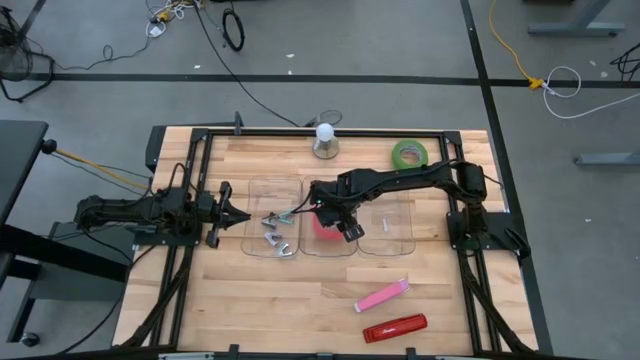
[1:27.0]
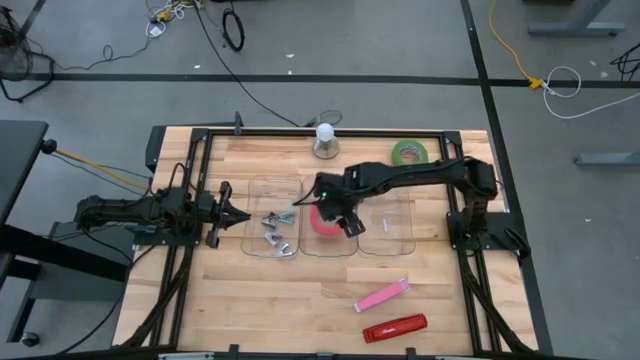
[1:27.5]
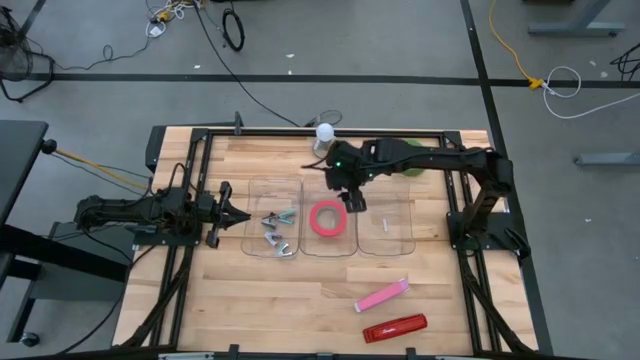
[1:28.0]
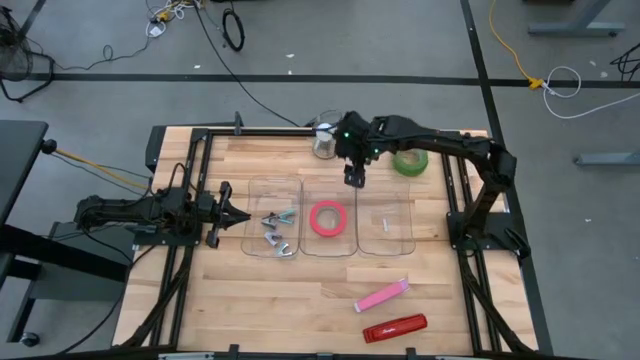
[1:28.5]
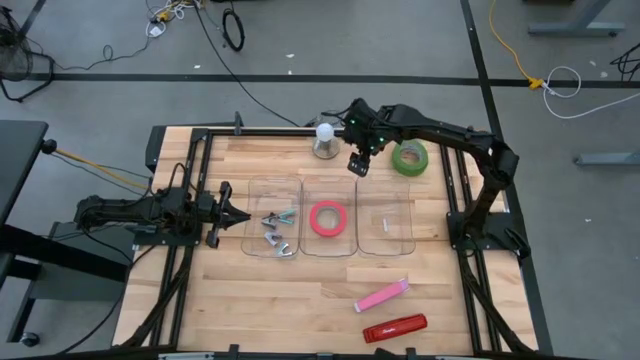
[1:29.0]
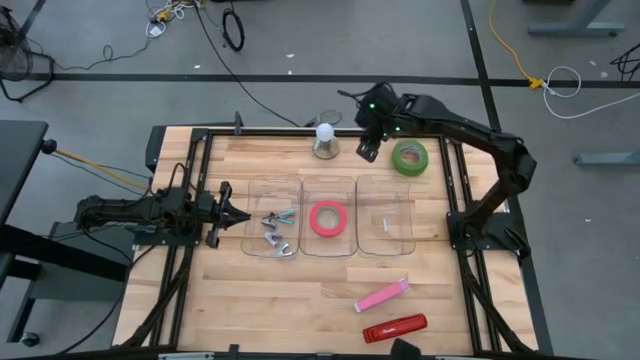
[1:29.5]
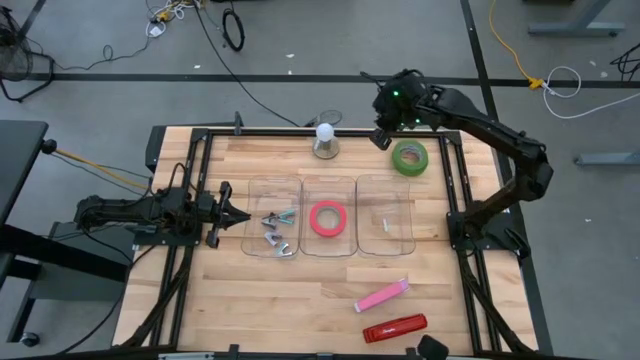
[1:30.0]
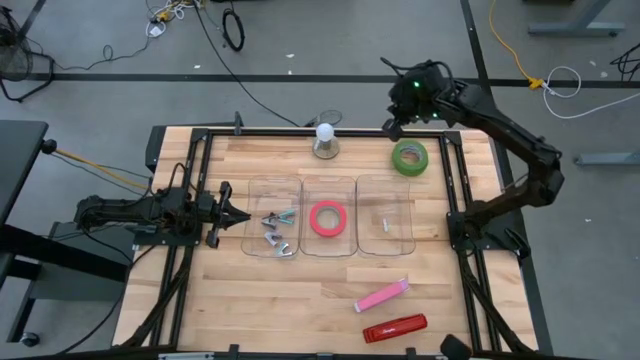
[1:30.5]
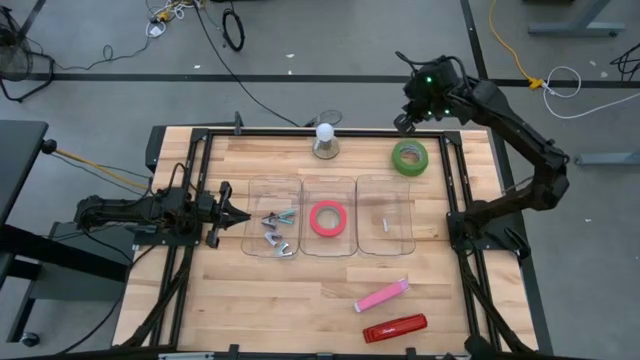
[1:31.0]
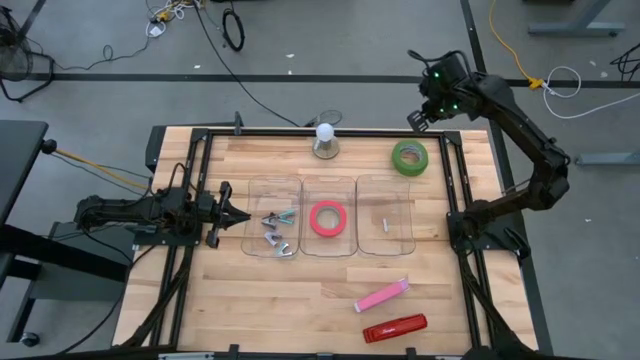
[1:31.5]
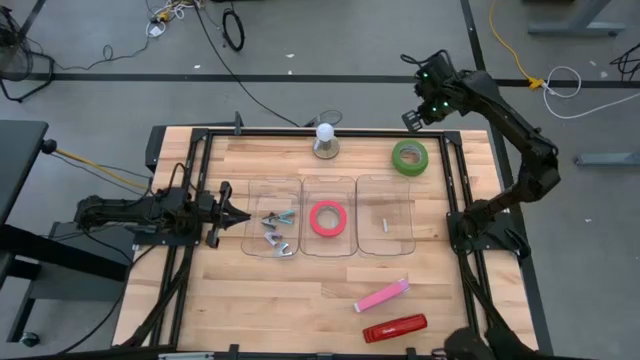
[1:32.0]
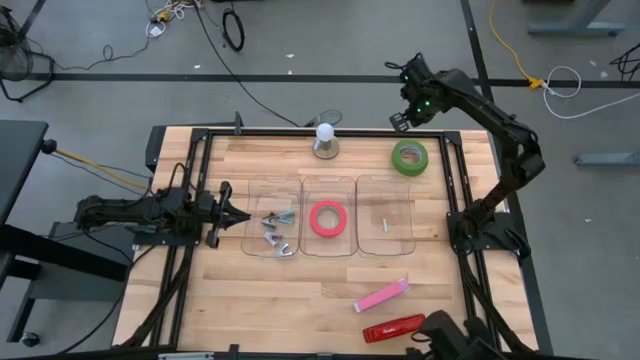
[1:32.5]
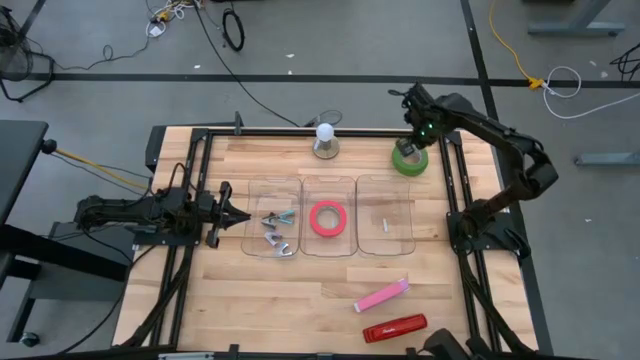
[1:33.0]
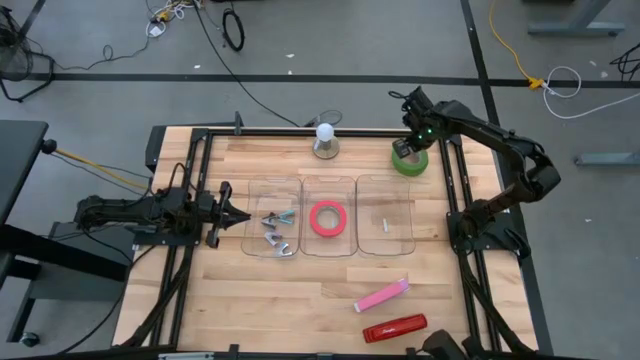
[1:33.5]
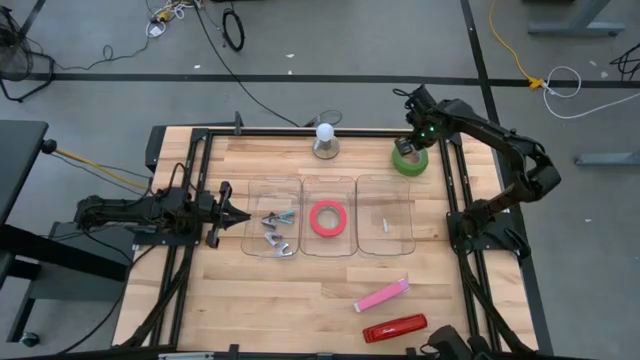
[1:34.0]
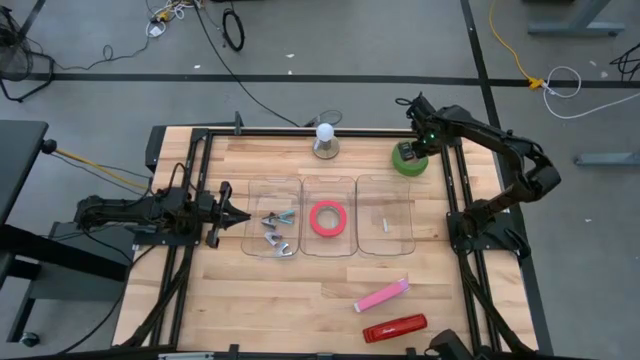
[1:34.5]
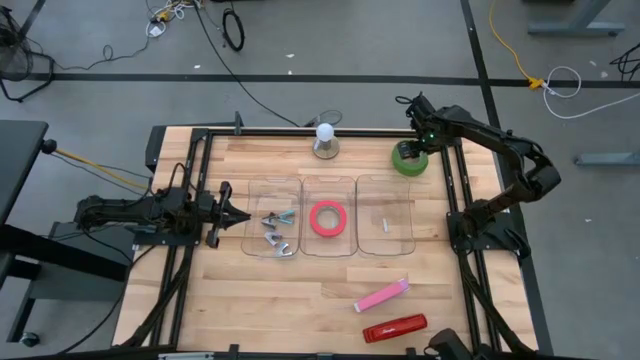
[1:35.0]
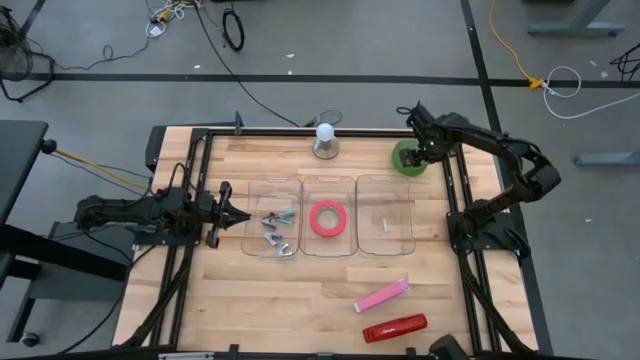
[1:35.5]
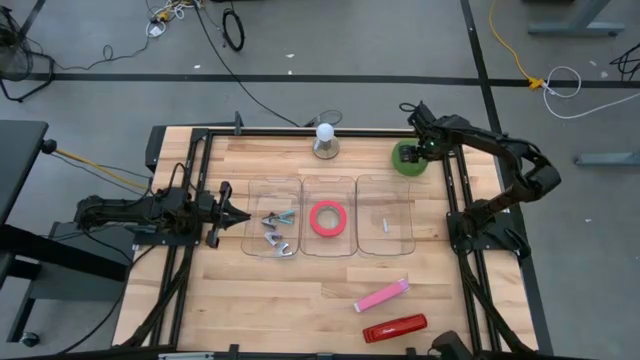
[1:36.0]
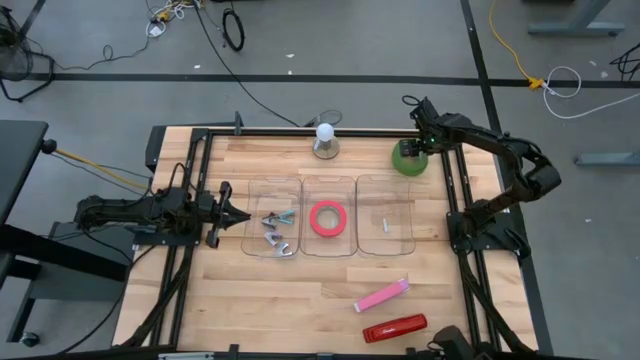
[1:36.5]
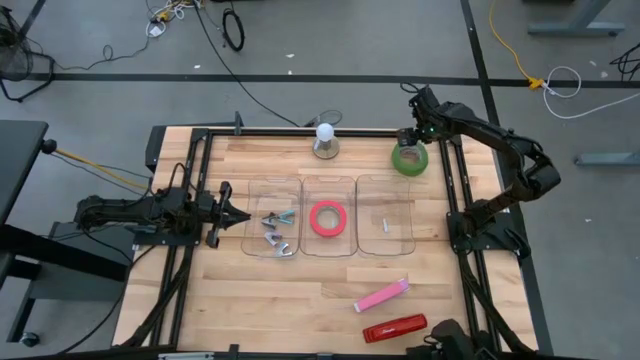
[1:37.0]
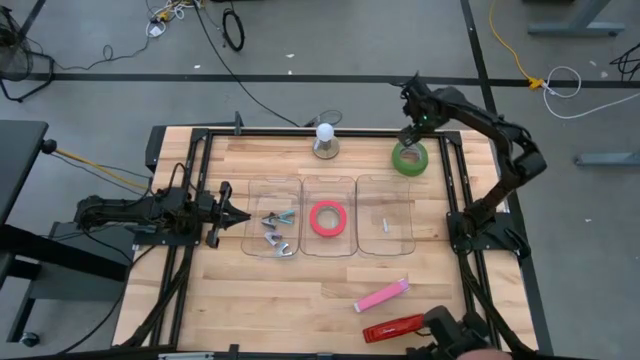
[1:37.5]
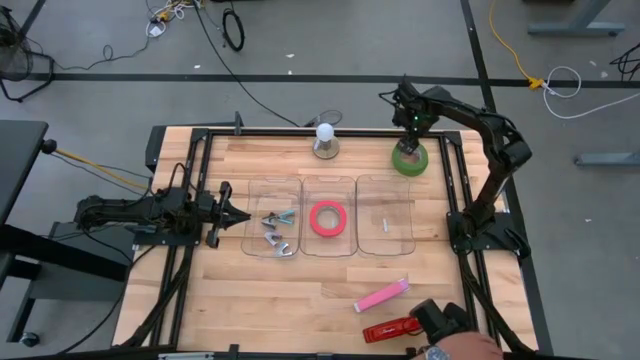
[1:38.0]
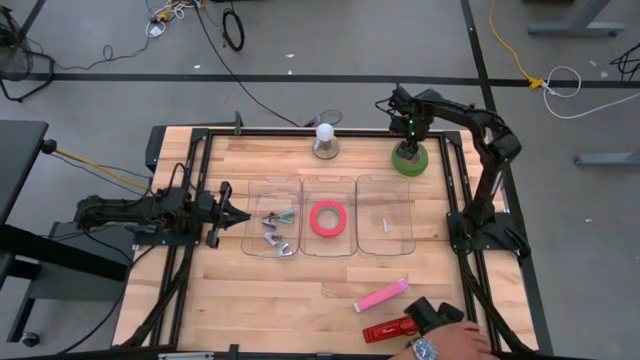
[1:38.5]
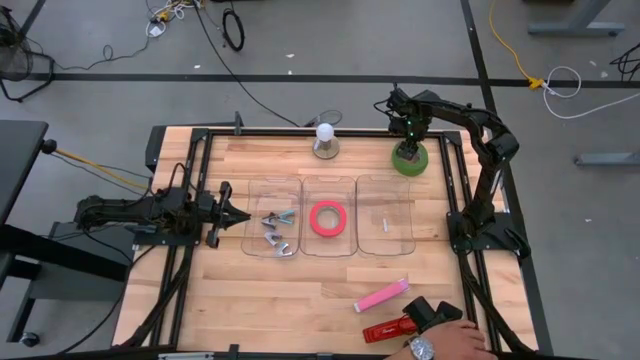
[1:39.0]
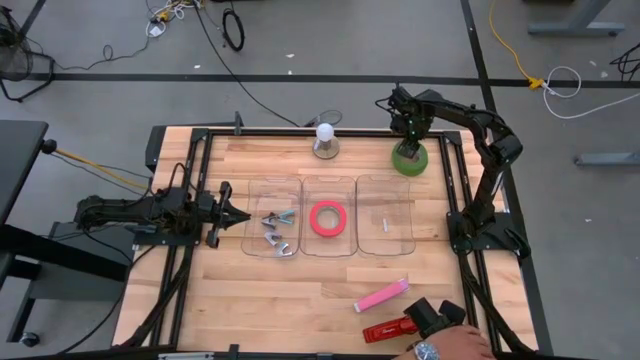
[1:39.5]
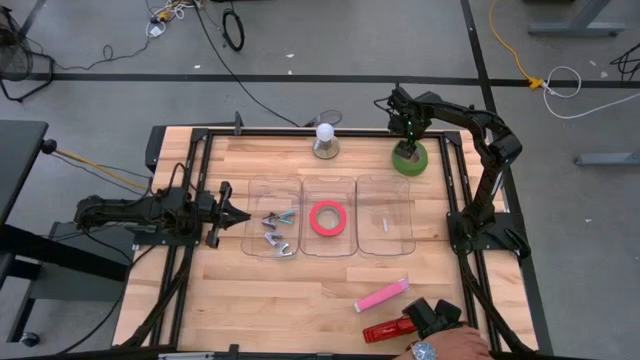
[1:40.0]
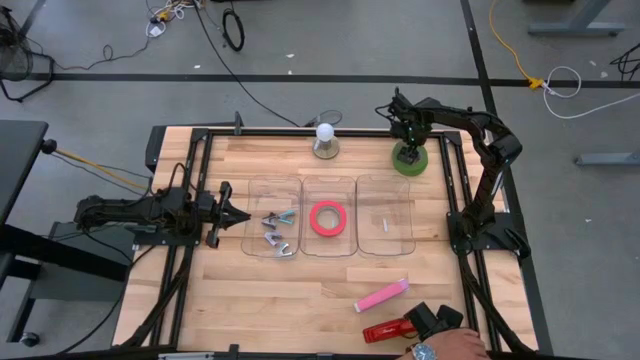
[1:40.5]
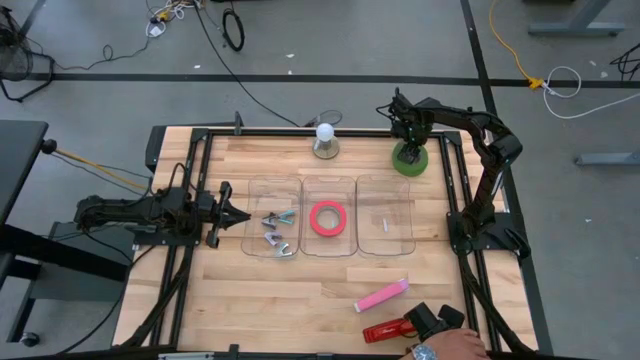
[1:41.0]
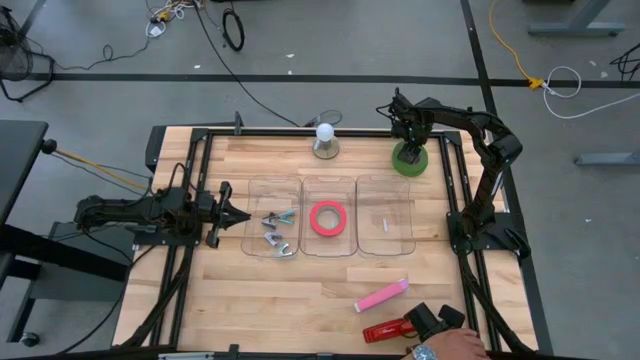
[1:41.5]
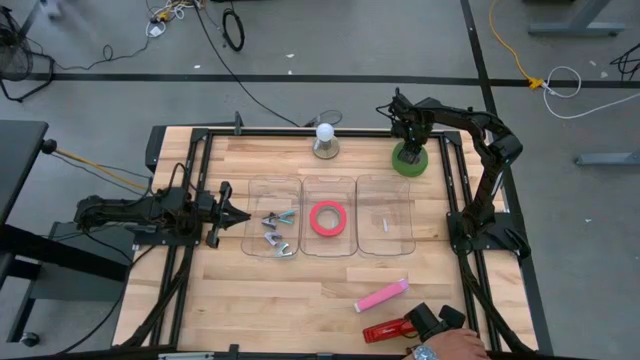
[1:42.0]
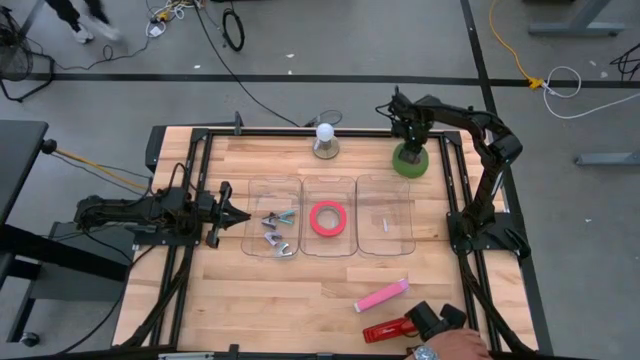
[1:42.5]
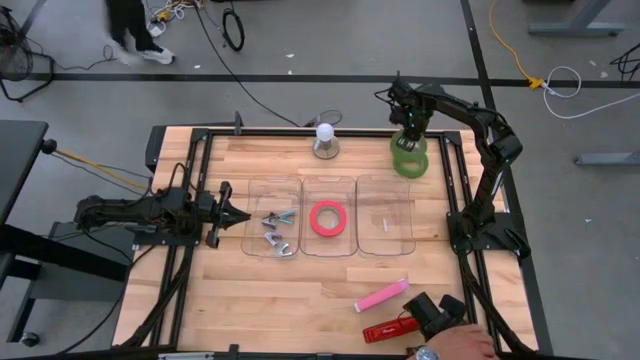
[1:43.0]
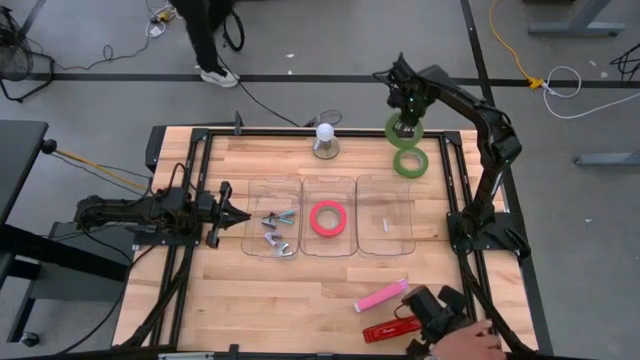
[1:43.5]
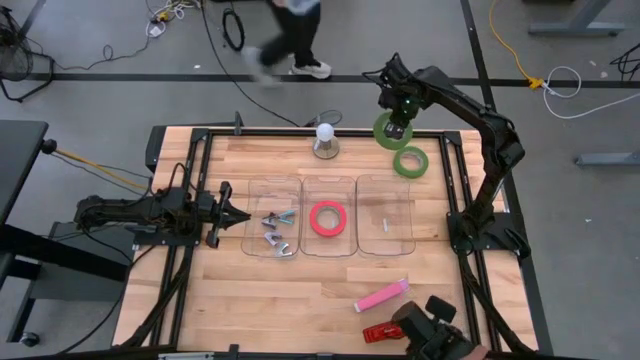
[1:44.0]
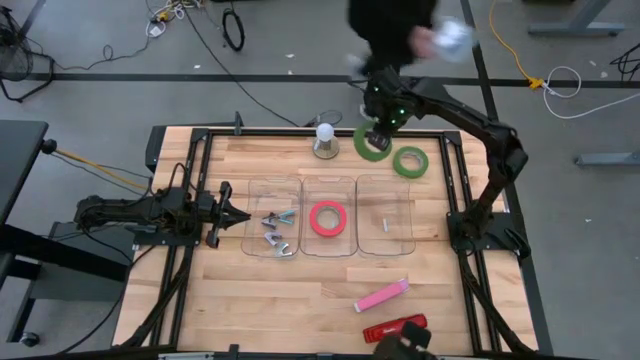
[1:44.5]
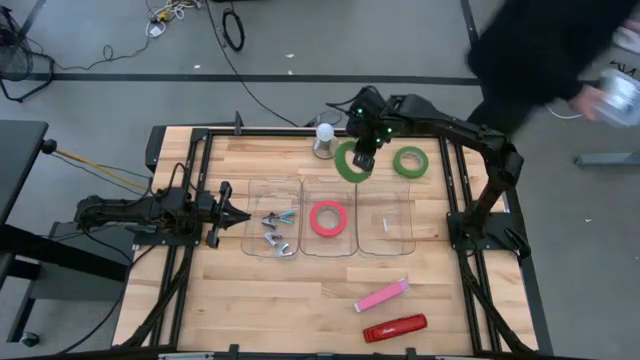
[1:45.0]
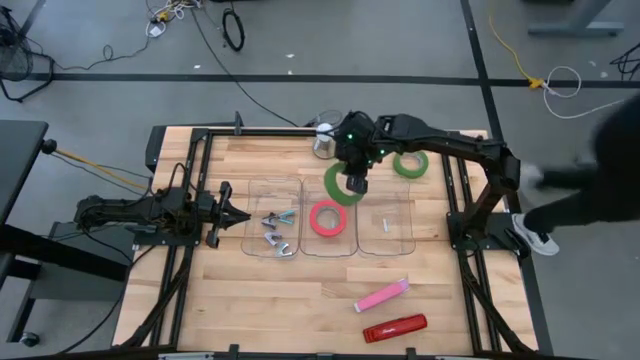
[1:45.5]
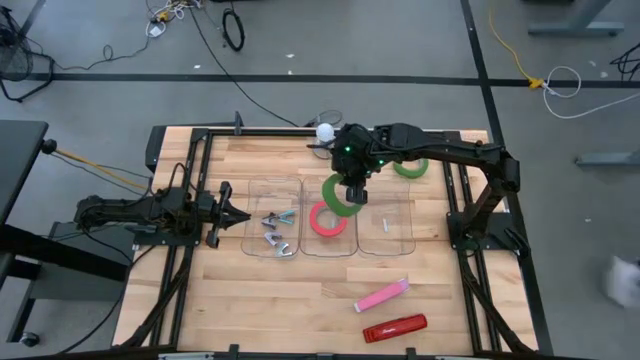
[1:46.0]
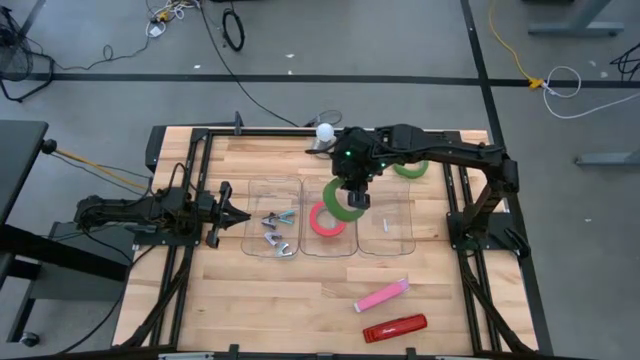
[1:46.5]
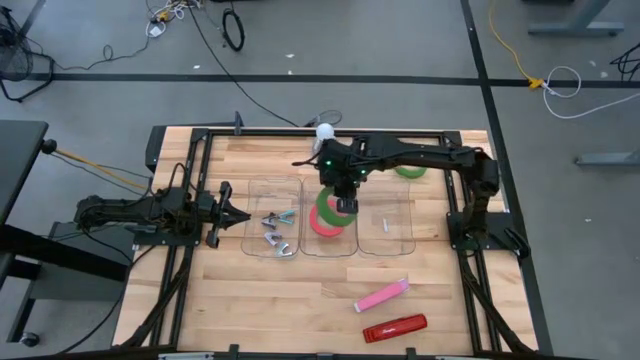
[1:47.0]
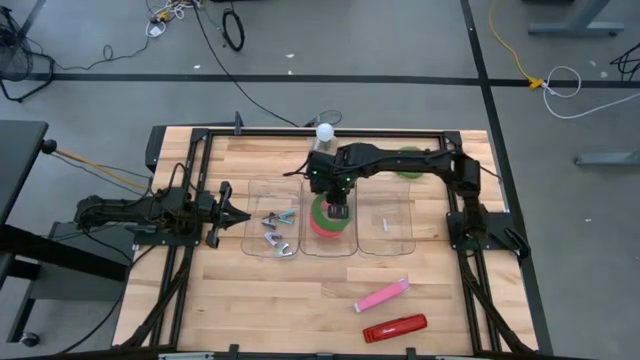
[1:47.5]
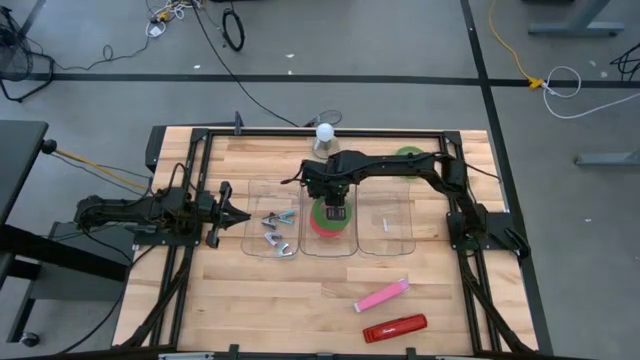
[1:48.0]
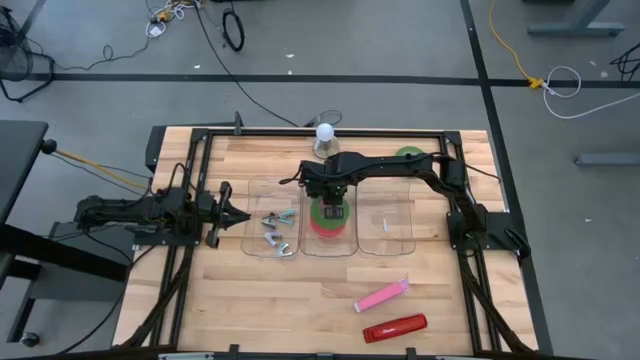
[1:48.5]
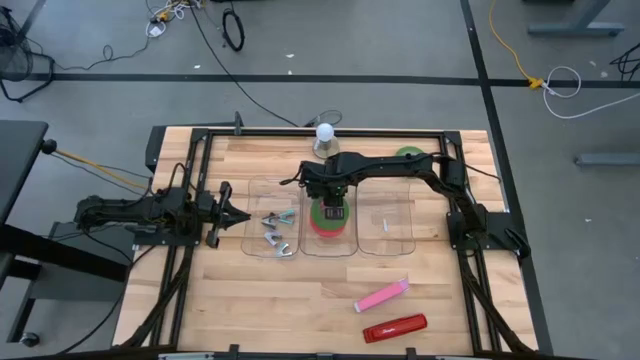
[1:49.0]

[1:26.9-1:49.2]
Task: Pick and place Stapler, Stapler remover, tape
Put the green tape into the middle transparent bin
